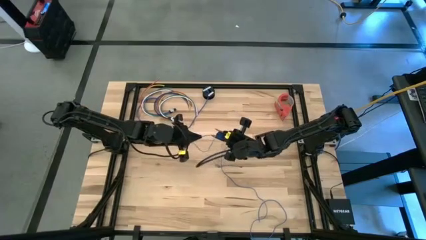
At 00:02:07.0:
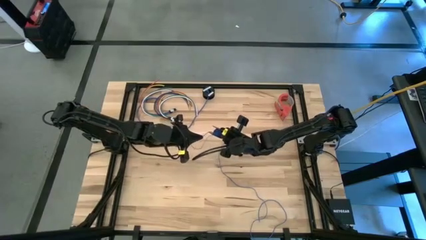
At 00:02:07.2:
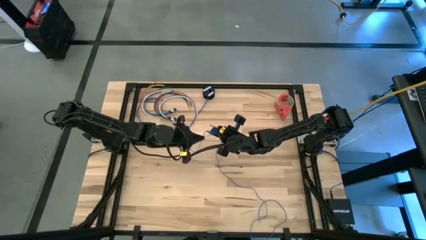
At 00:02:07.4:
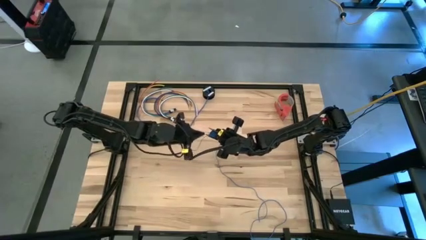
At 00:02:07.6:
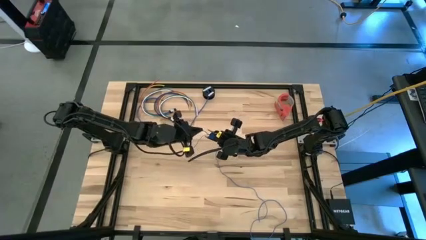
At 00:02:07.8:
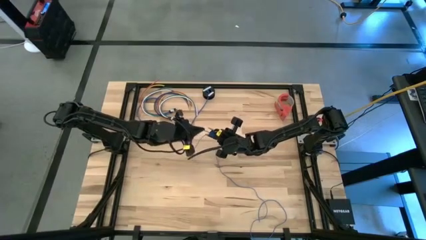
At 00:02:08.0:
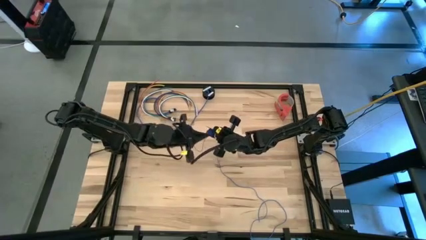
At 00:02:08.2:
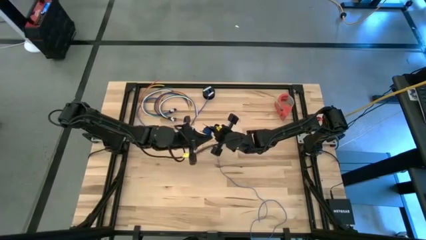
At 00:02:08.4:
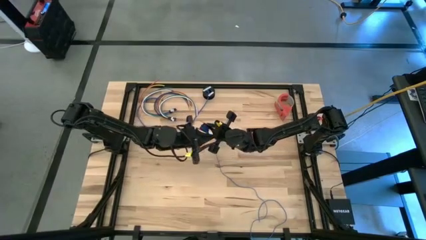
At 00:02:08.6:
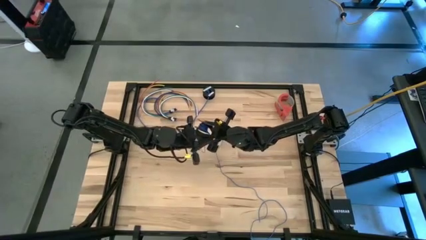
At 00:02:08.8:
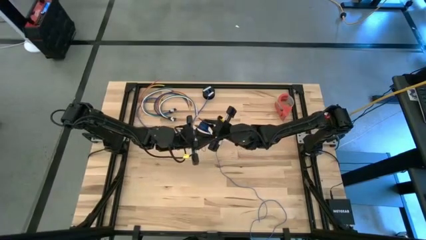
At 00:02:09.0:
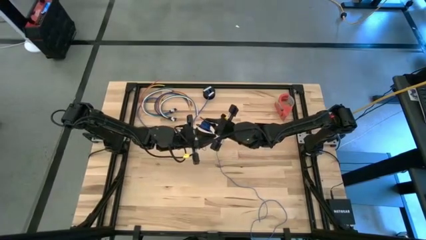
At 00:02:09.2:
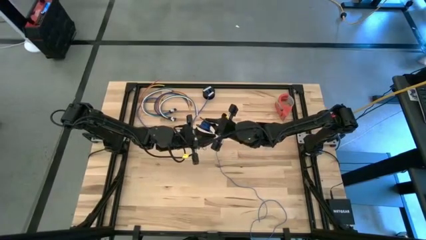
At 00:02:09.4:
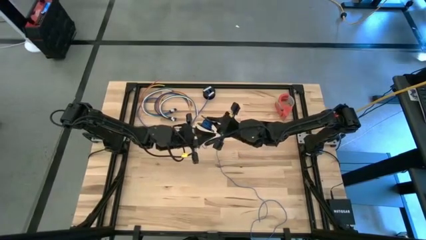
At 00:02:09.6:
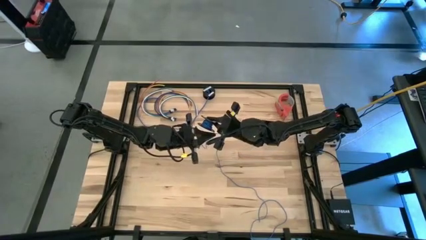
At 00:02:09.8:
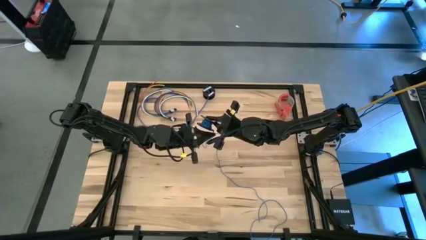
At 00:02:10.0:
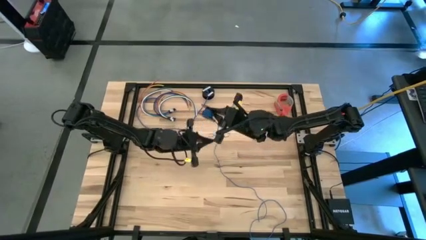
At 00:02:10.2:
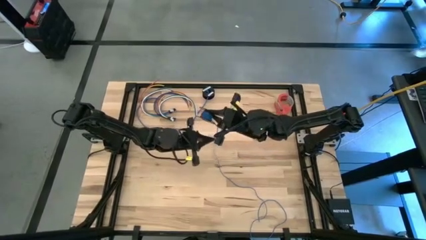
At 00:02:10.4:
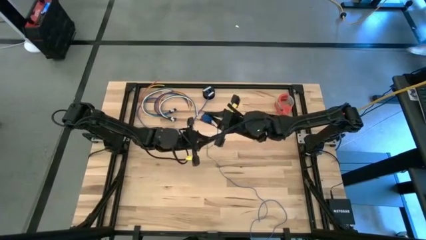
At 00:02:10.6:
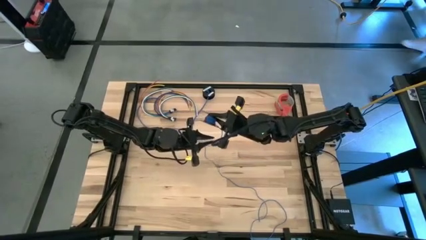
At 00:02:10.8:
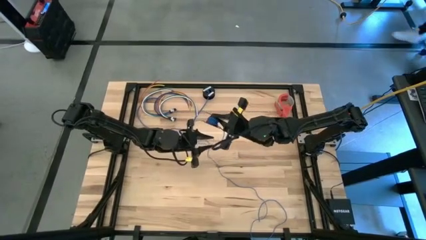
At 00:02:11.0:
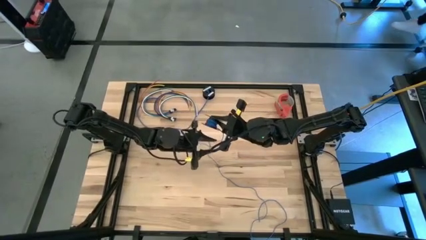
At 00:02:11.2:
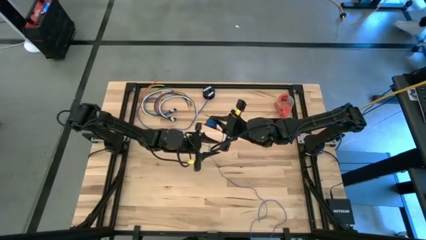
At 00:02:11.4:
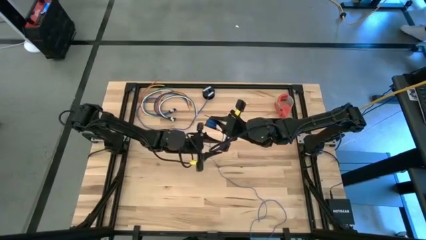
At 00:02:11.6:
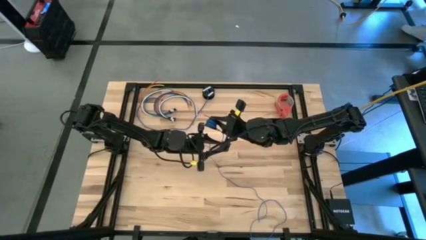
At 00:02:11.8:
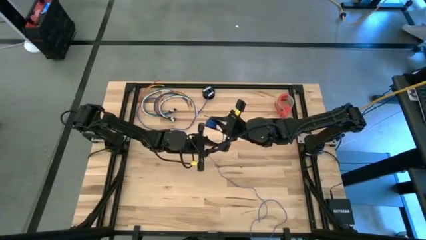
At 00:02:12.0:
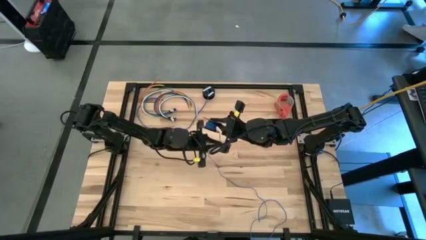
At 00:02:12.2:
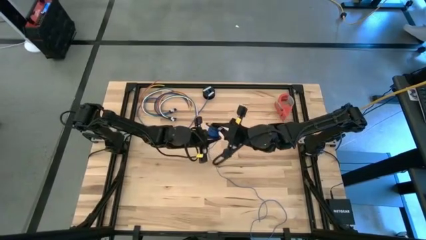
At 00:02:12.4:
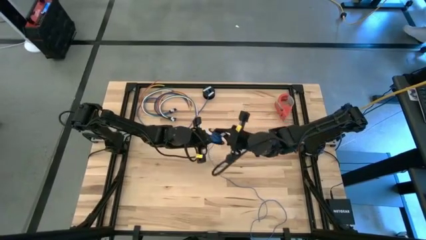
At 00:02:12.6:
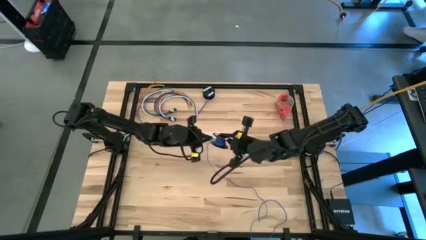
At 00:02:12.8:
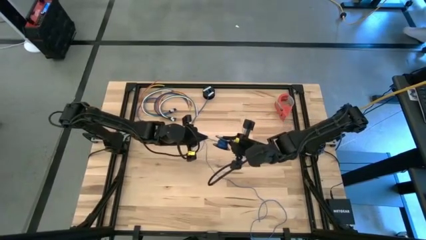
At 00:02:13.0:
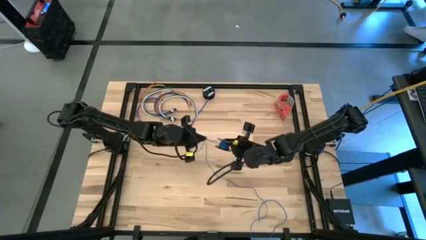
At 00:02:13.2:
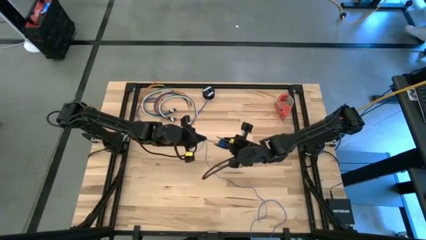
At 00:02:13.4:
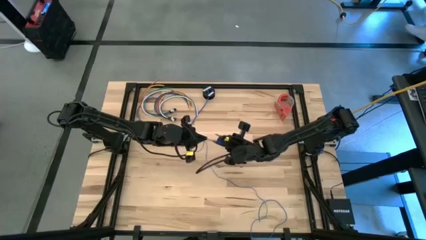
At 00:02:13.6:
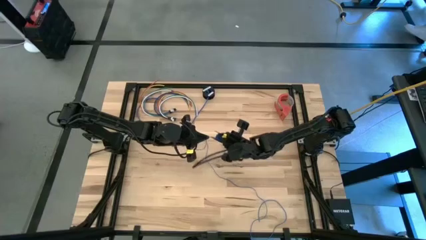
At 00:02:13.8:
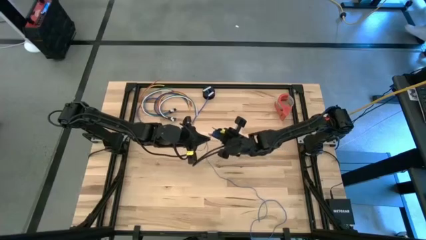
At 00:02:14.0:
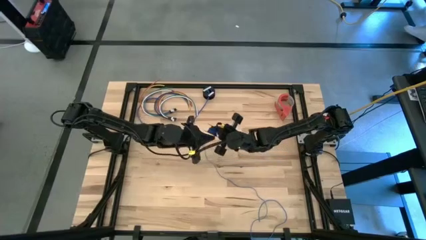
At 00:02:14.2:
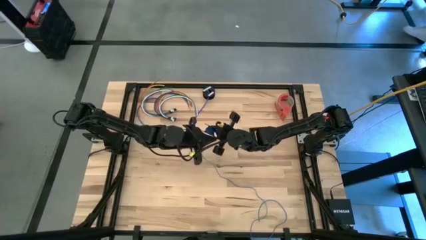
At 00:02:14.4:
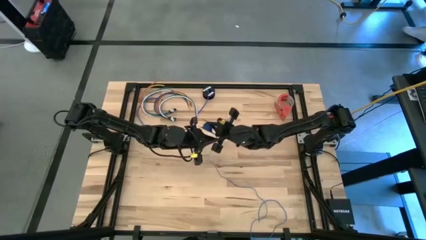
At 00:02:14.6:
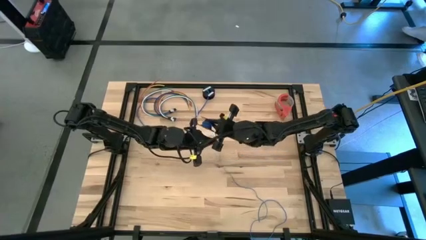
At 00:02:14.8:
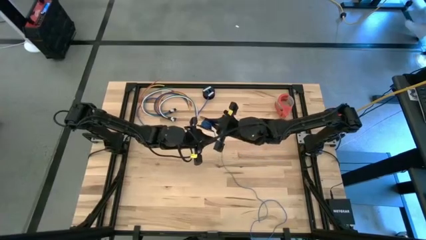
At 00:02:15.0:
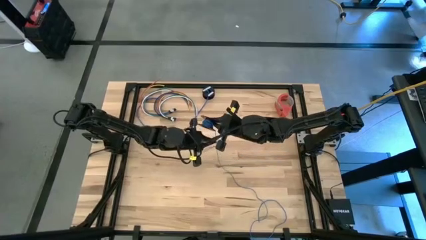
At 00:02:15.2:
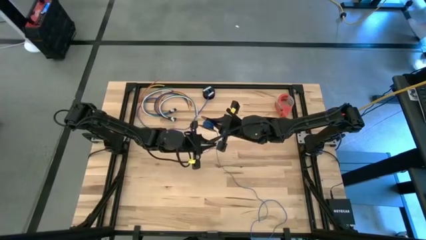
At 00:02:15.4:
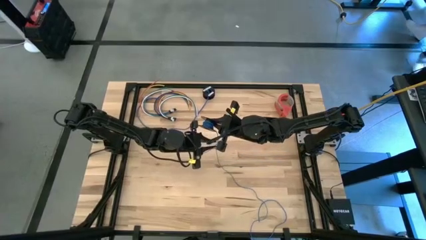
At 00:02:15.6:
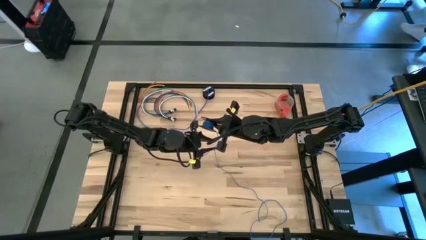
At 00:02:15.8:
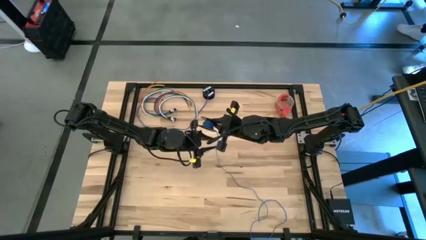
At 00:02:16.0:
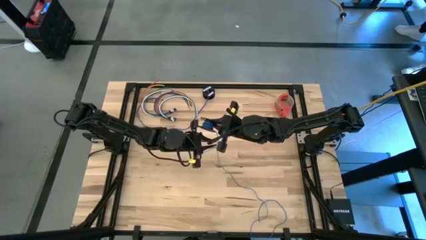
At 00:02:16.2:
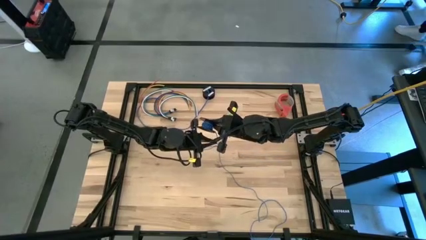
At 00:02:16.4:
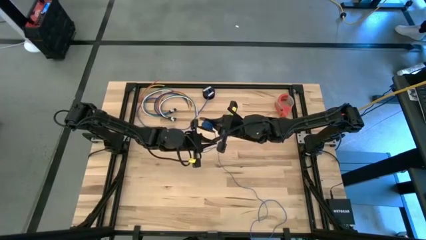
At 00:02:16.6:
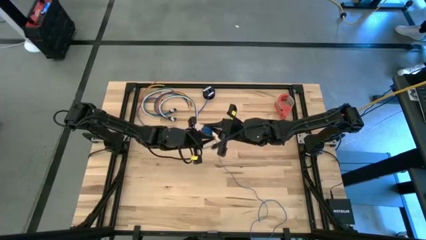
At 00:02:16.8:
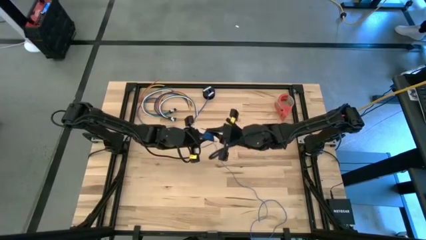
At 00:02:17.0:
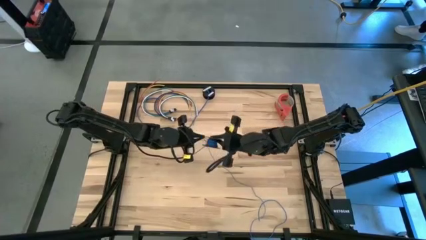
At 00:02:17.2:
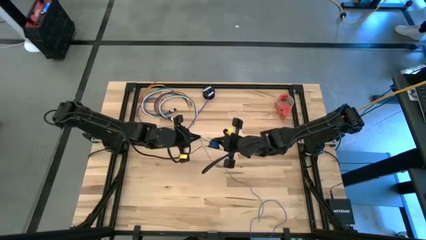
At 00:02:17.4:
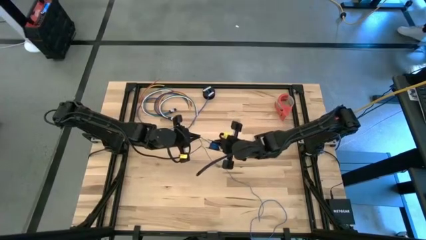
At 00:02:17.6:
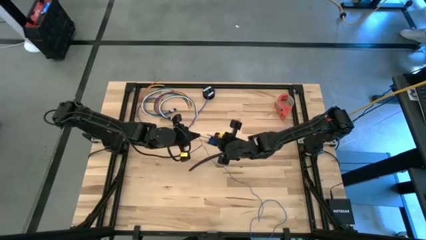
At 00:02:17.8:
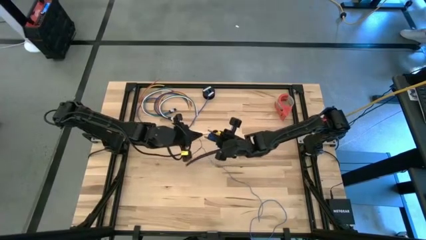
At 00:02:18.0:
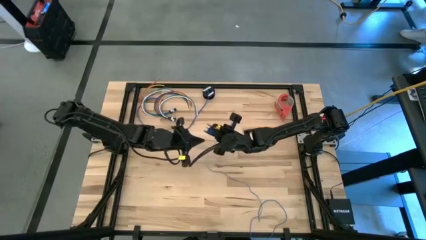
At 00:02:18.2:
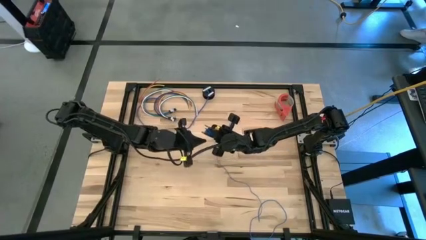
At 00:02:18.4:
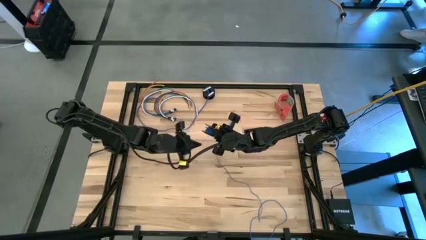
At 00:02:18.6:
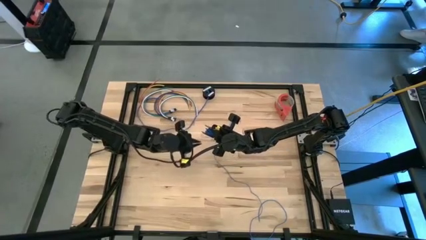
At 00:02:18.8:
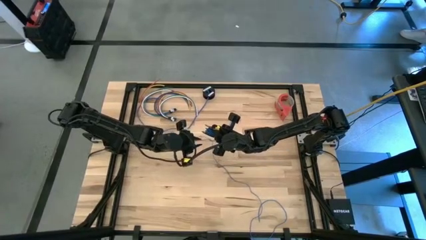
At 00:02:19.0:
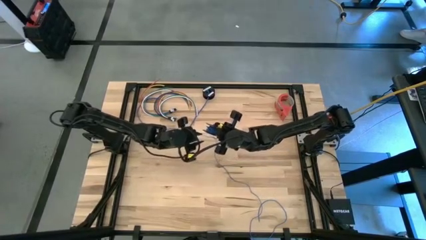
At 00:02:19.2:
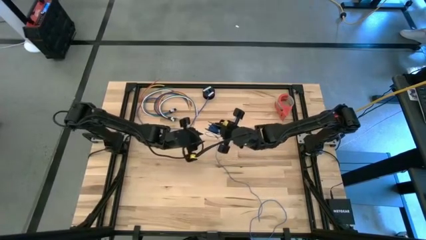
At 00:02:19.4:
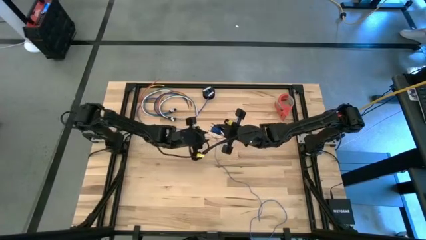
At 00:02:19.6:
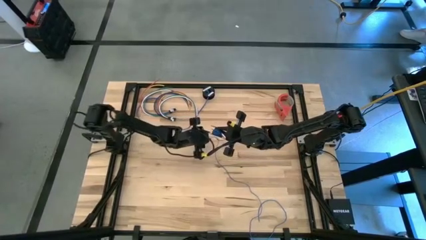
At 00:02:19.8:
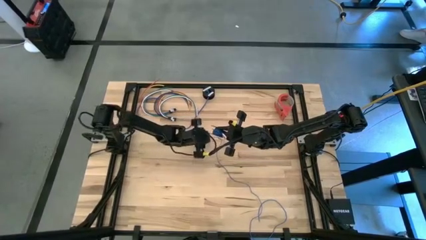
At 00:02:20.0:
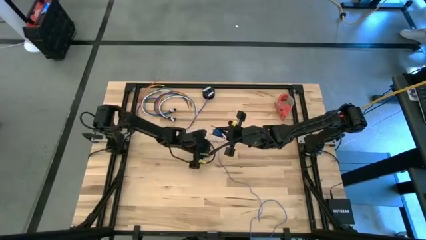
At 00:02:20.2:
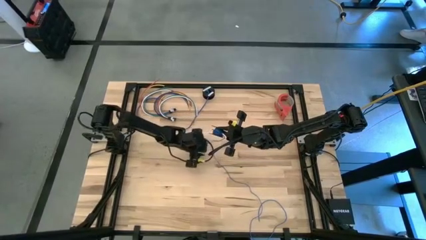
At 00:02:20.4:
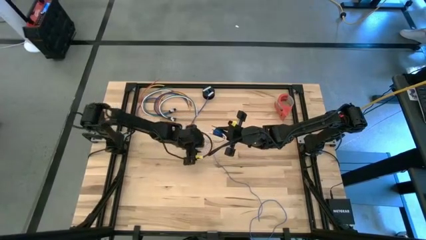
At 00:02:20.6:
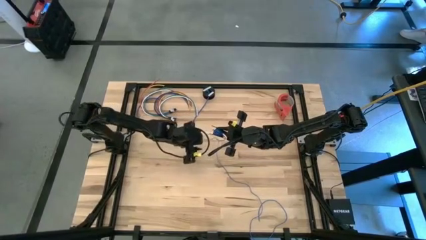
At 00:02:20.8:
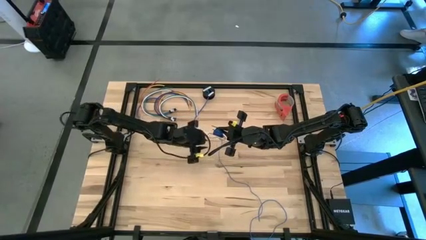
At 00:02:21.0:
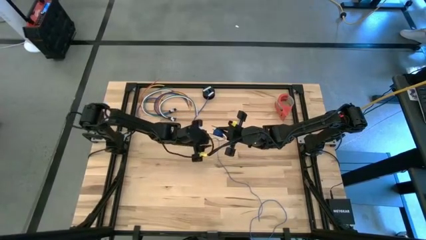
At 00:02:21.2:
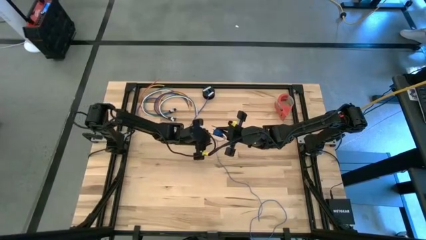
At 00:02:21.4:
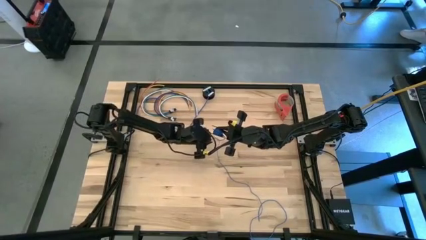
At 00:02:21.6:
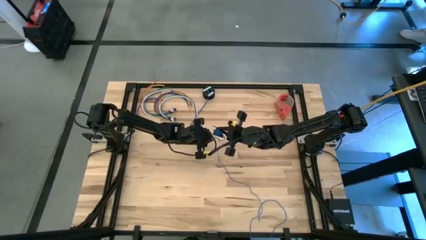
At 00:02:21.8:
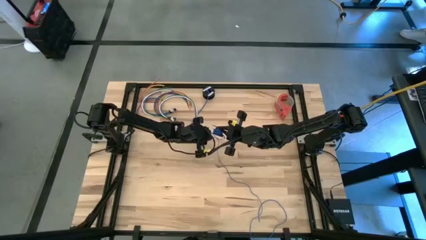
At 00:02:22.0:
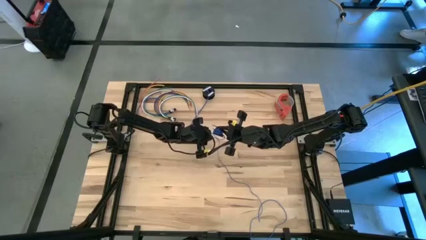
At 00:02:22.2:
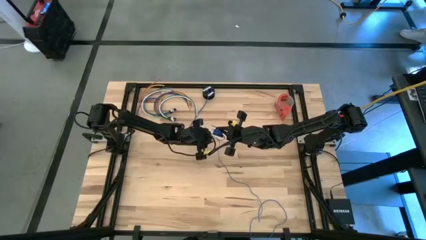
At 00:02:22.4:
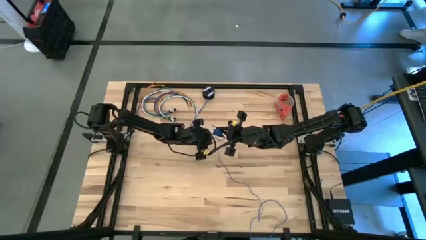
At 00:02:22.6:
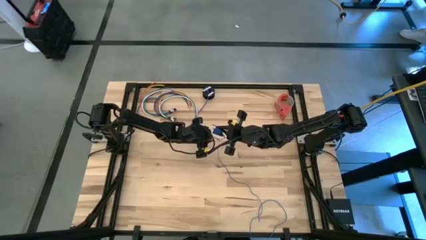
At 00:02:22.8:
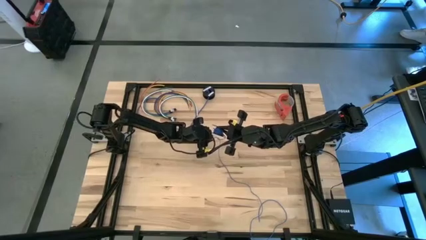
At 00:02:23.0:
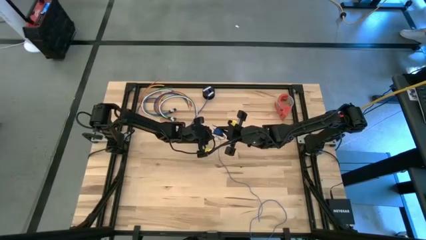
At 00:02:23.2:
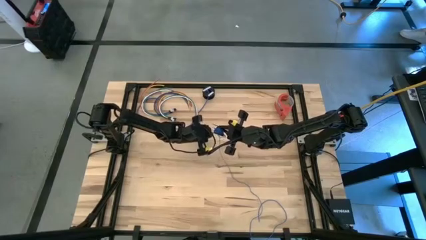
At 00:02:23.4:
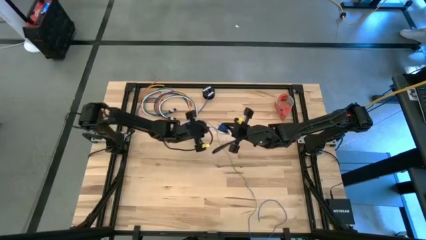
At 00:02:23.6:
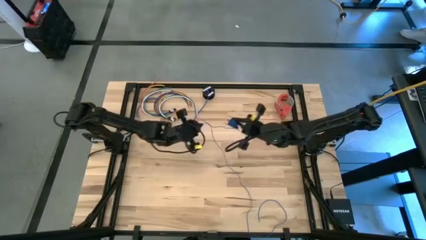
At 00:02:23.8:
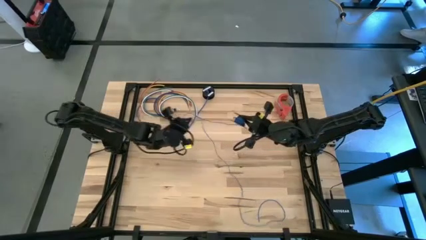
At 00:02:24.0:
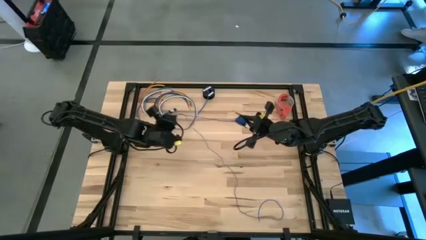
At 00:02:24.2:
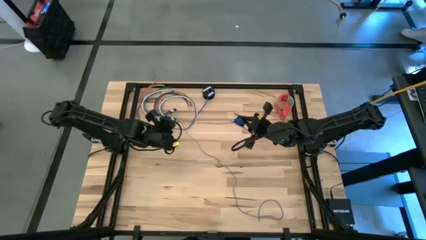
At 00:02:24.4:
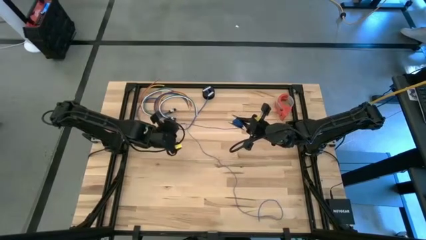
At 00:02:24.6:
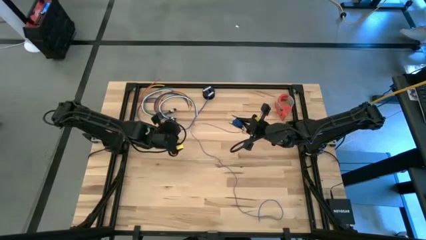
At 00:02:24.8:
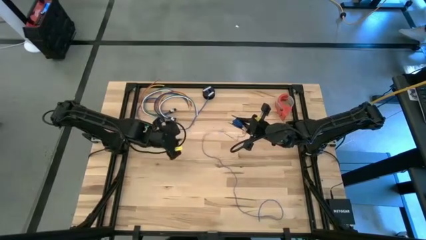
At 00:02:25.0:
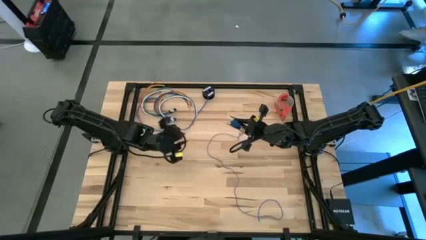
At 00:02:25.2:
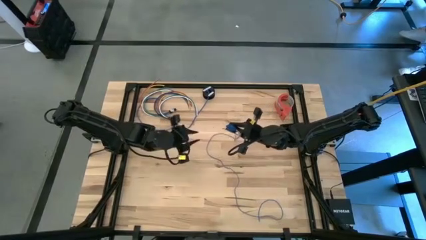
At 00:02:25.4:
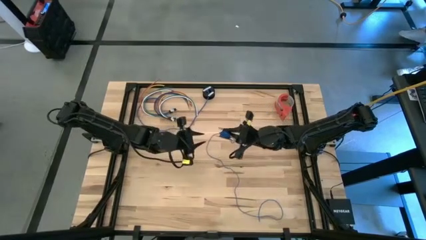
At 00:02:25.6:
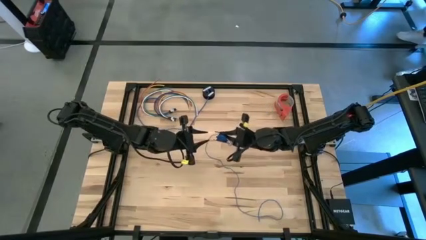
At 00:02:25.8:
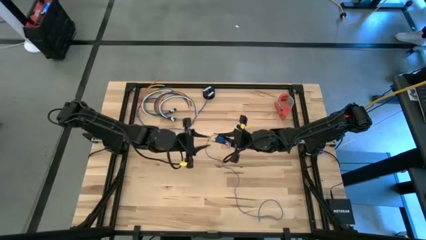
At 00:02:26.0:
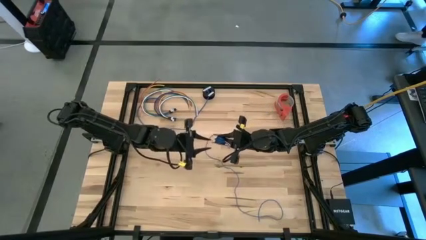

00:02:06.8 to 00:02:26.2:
Task: Coil cords
Coil the blue wire onto the black spool
